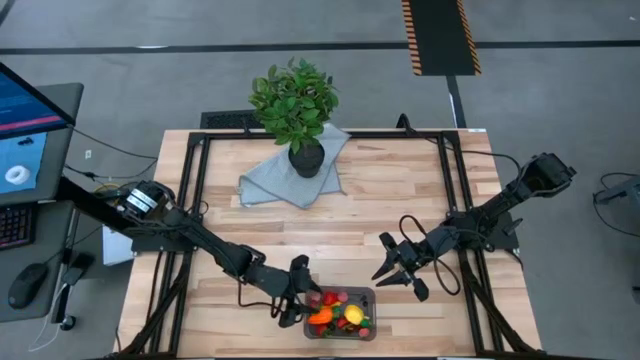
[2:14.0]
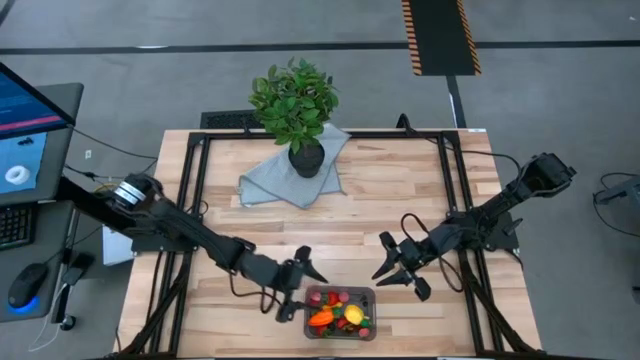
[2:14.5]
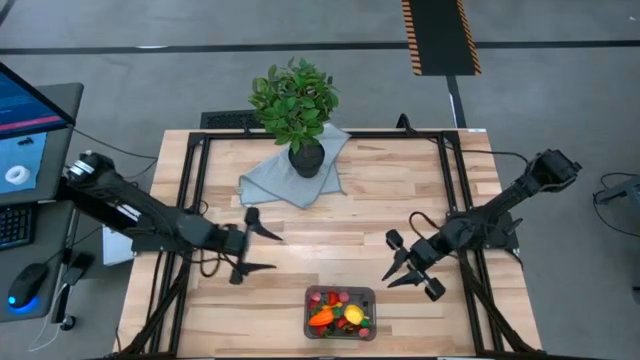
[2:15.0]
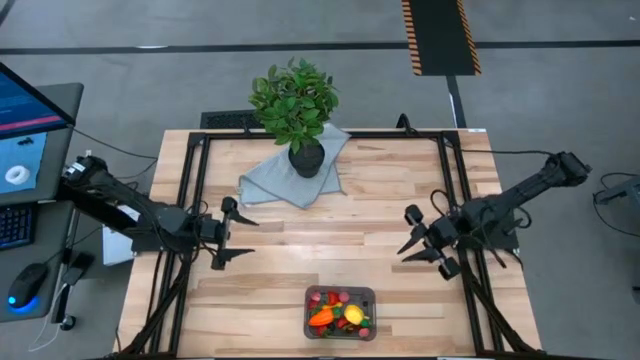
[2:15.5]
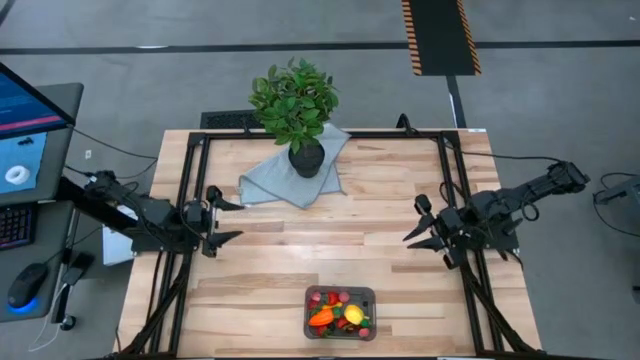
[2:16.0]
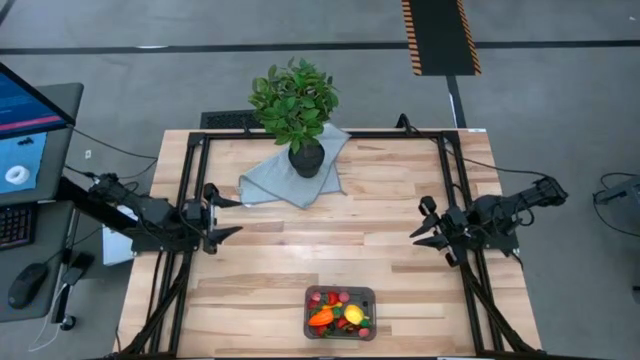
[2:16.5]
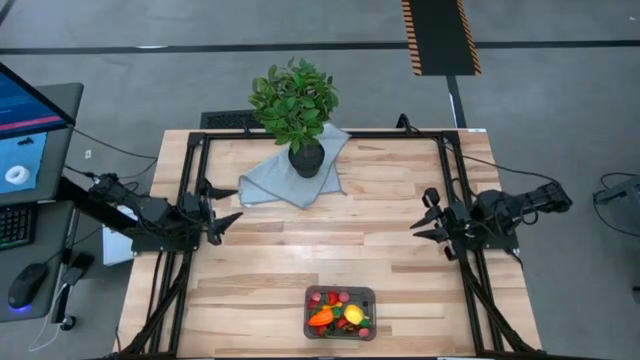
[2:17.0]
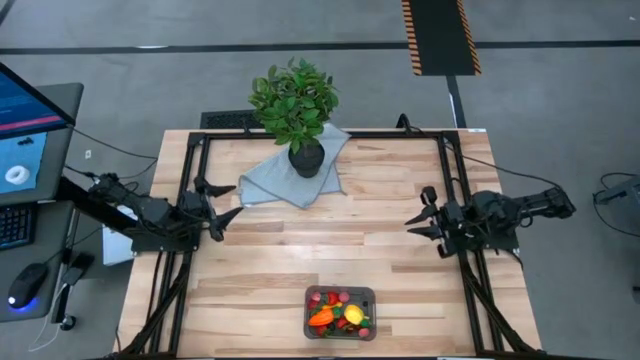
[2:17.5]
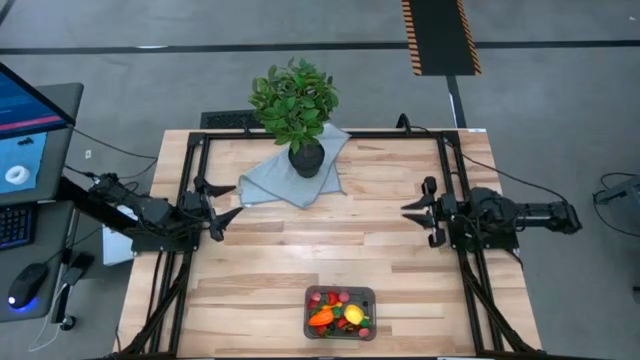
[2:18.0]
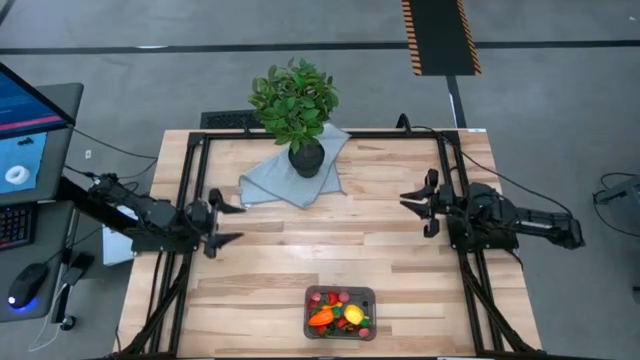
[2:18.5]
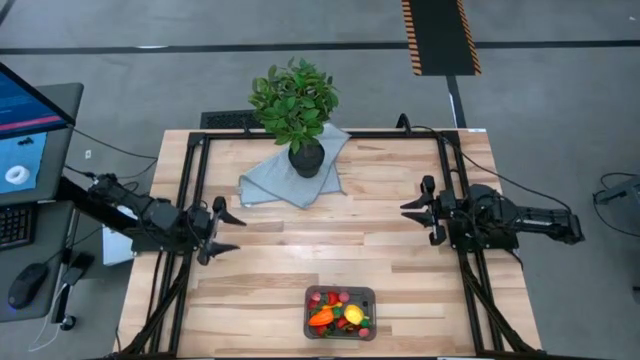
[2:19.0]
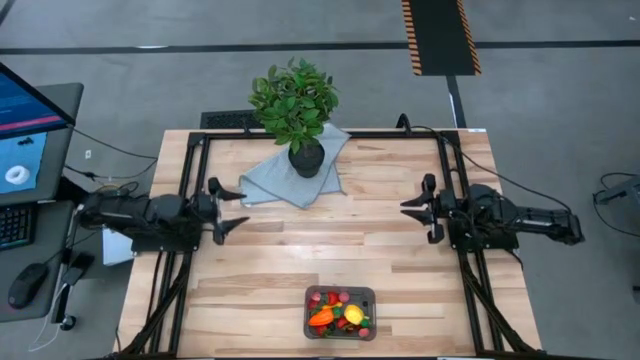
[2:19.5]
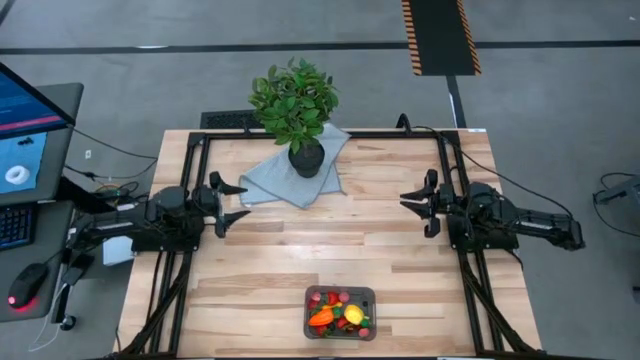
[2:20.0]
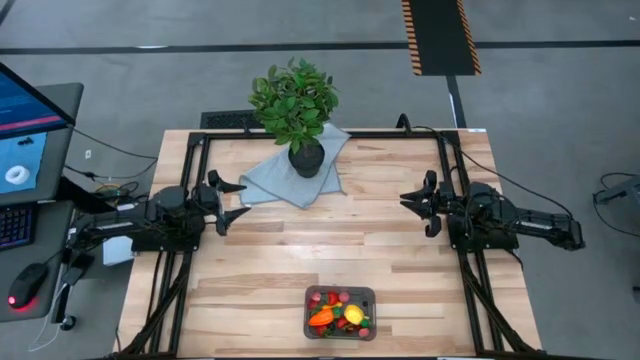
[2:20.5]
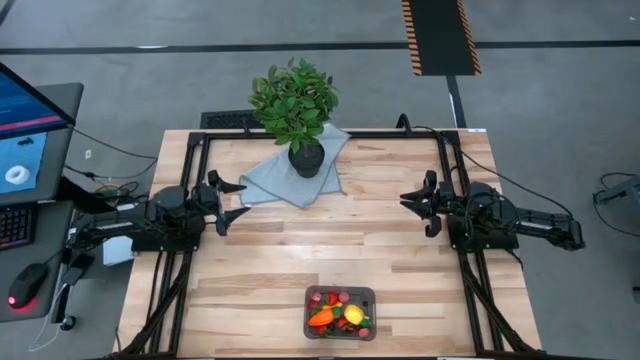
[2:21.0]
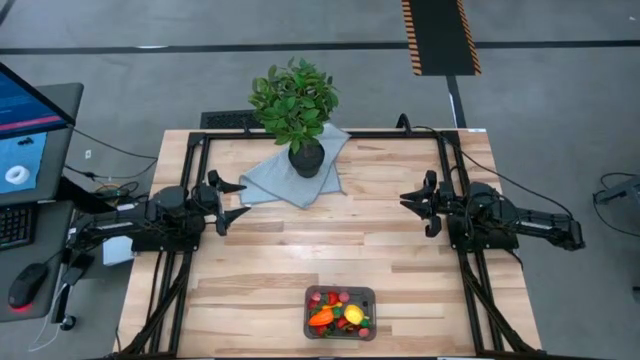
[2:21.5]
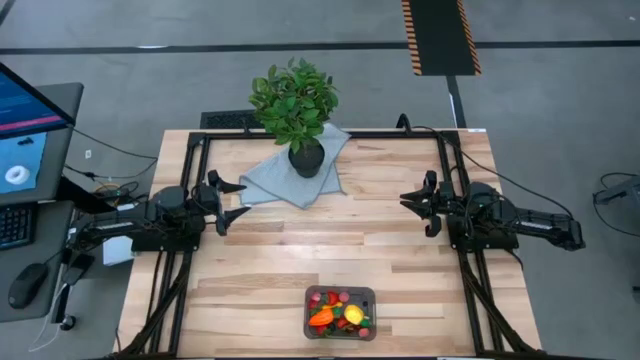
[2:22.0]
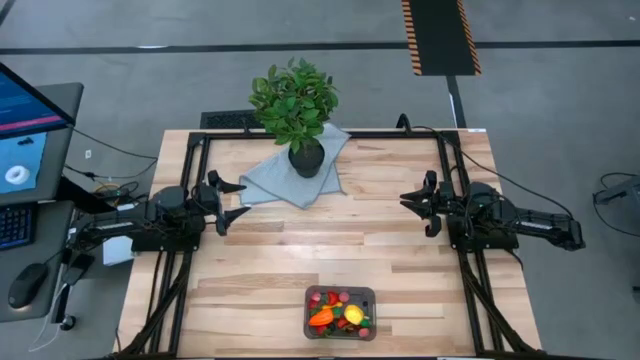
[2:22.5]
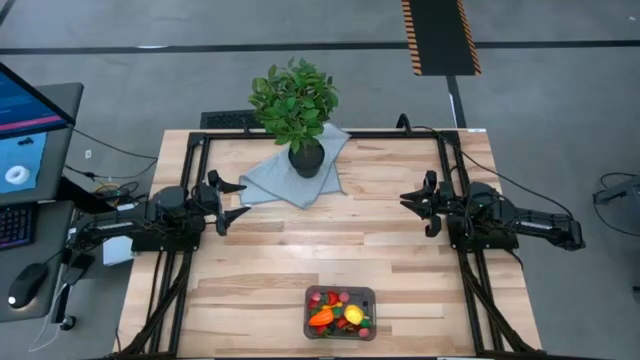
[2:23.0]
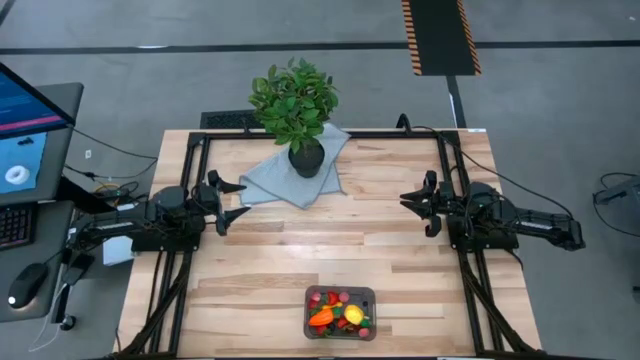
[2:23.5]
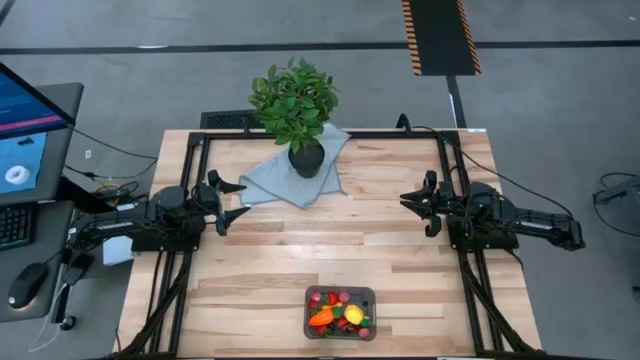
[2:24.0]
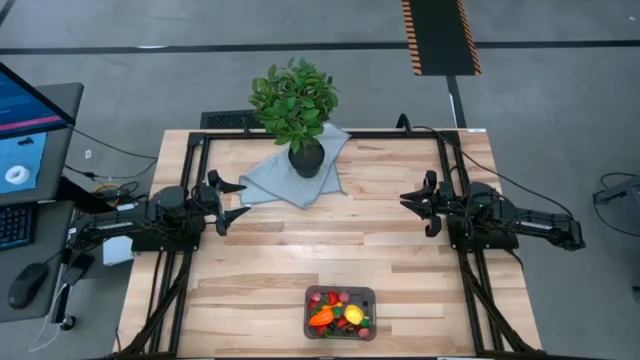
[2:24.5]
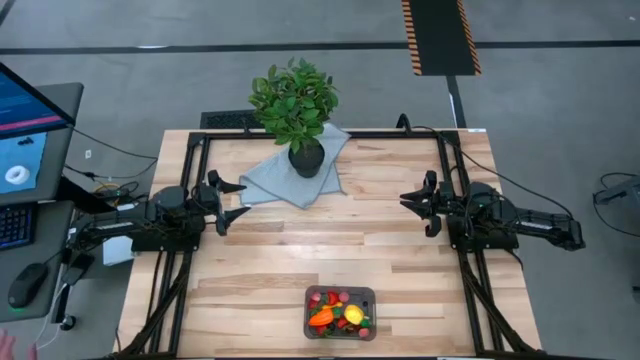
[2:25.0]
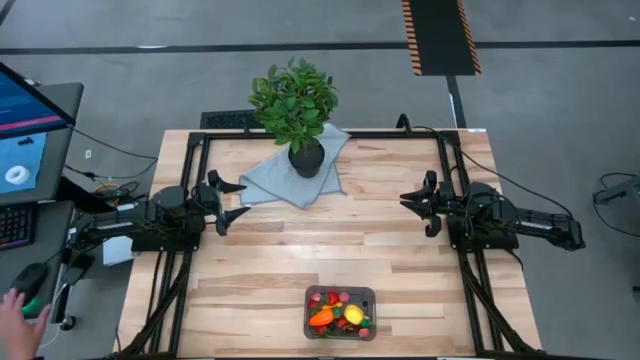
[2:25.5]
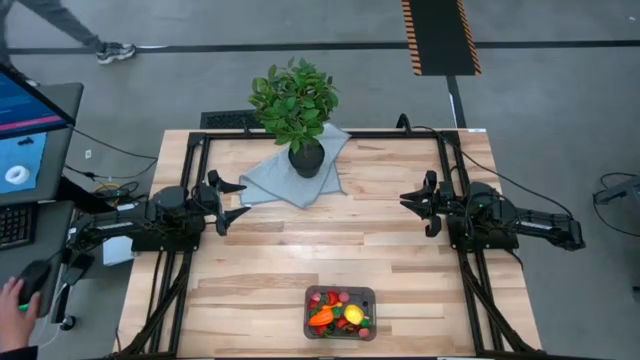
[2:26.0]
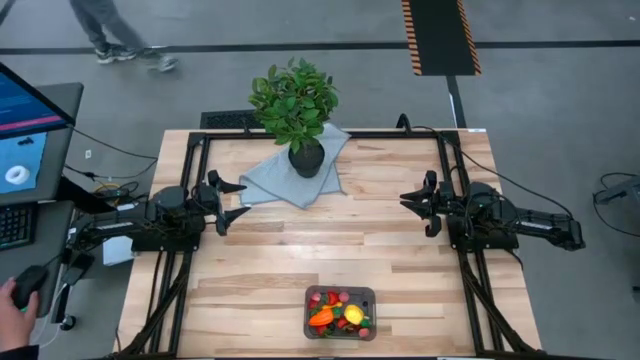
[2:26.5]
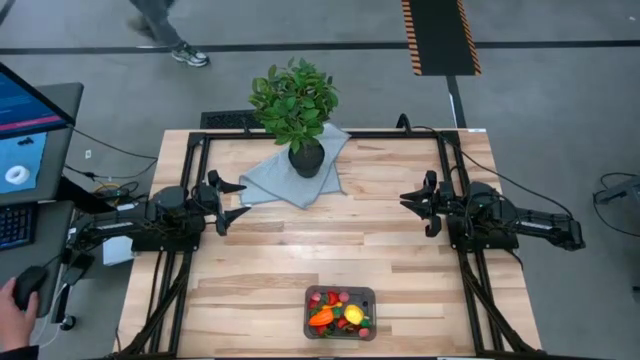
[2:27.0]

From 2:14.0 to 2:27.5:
Task: Pick and placing Produce into tupperware
Return to Home Position

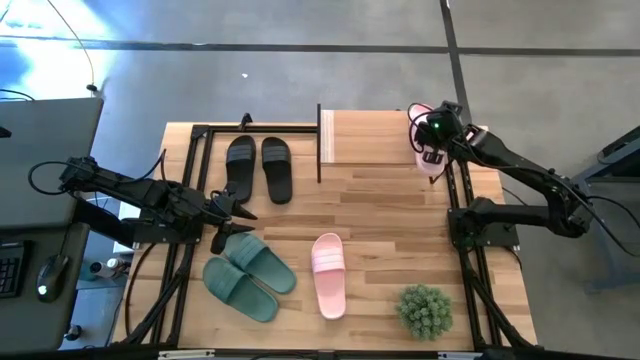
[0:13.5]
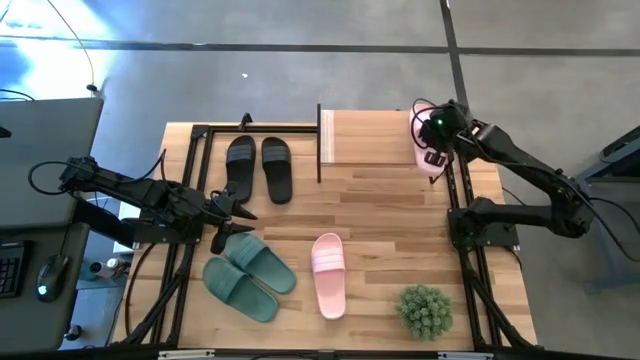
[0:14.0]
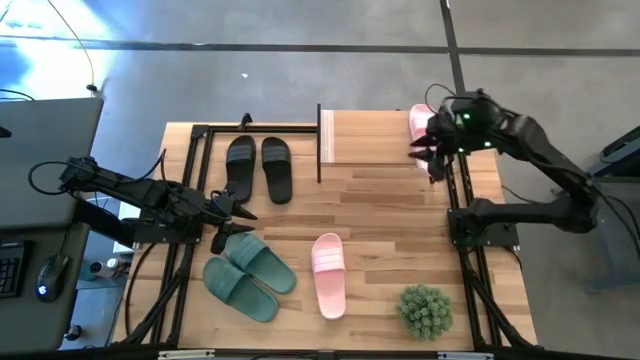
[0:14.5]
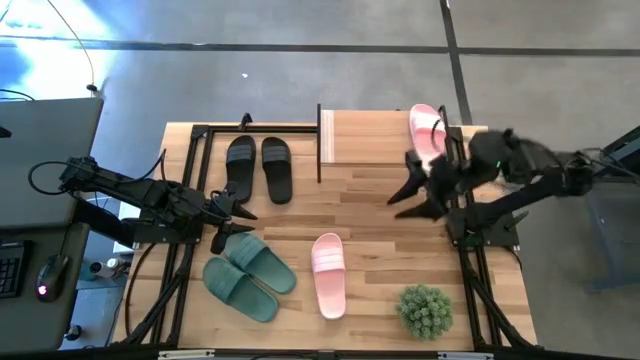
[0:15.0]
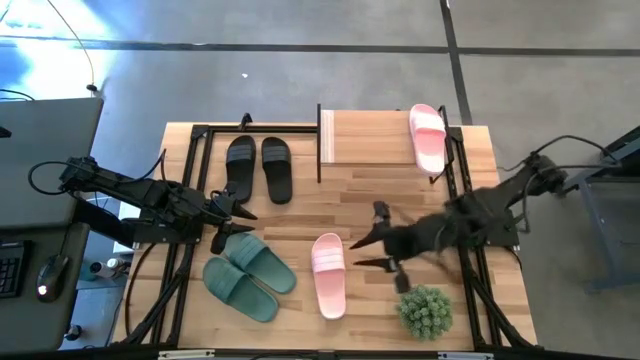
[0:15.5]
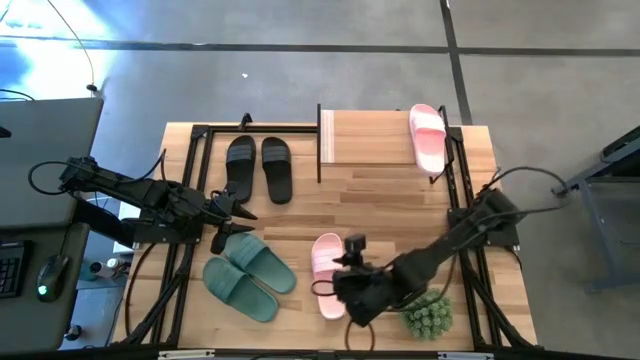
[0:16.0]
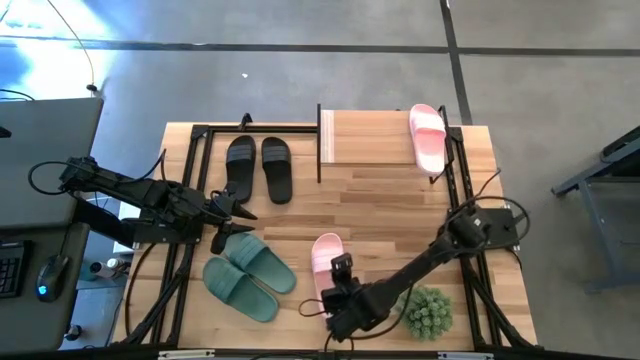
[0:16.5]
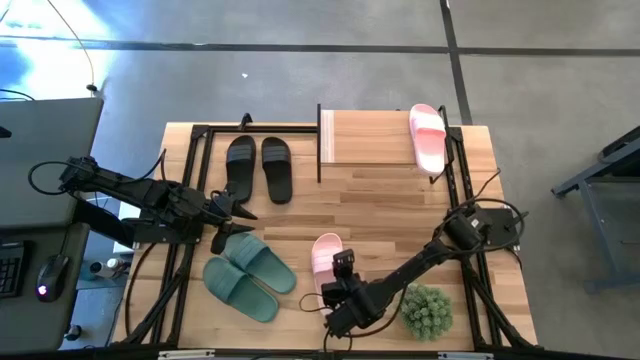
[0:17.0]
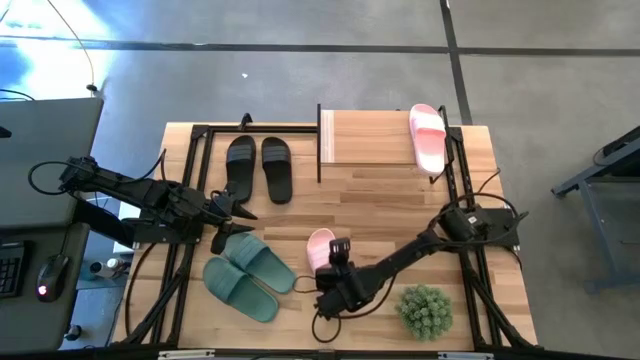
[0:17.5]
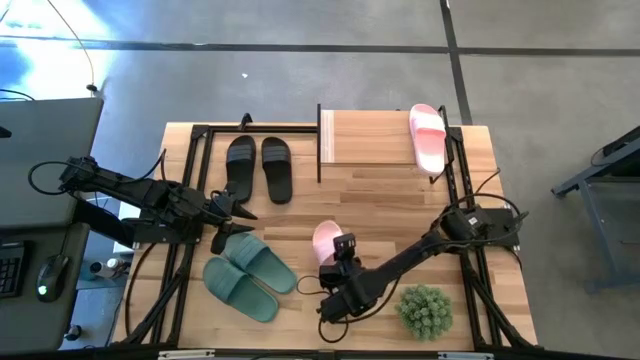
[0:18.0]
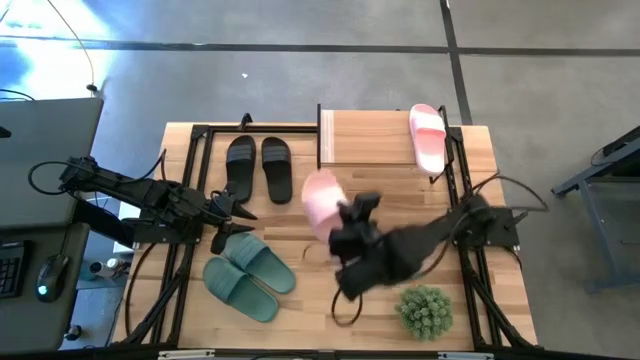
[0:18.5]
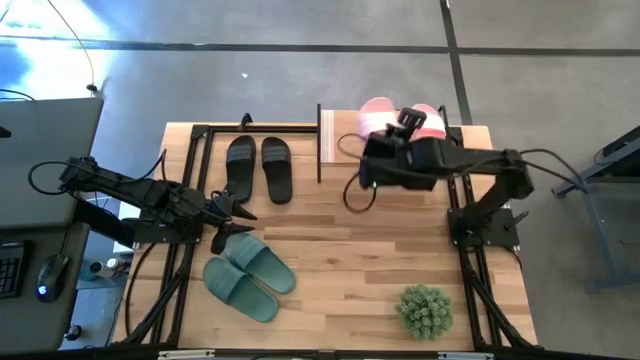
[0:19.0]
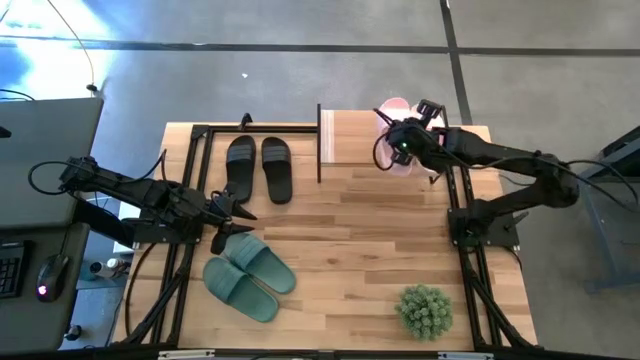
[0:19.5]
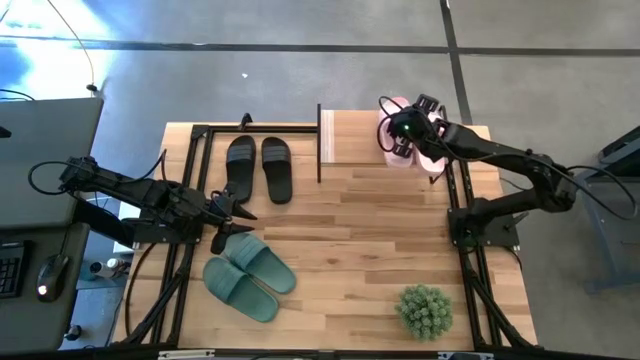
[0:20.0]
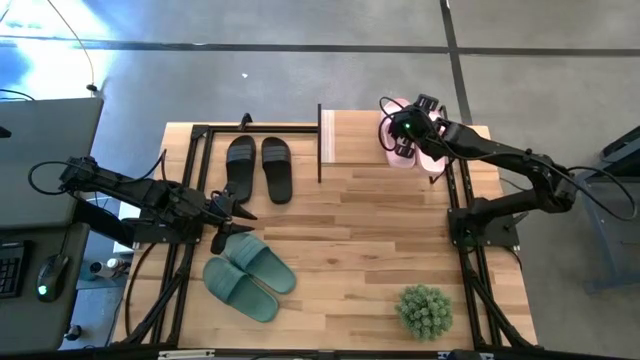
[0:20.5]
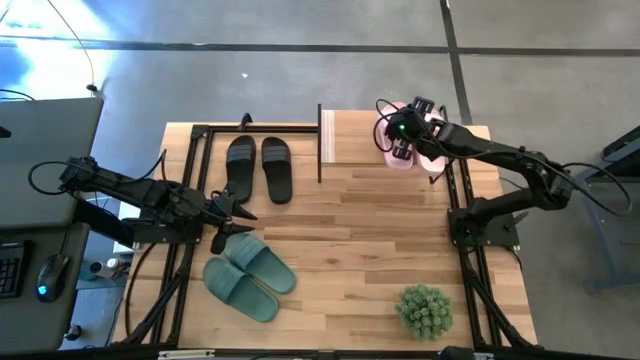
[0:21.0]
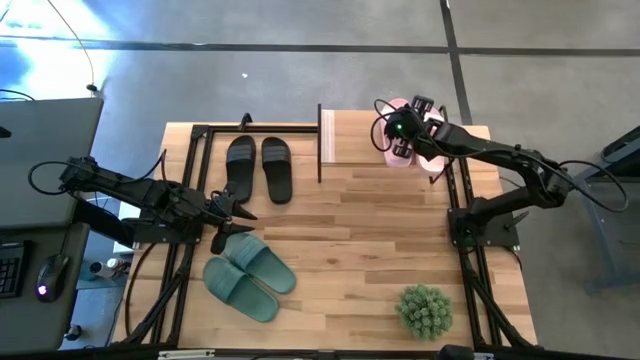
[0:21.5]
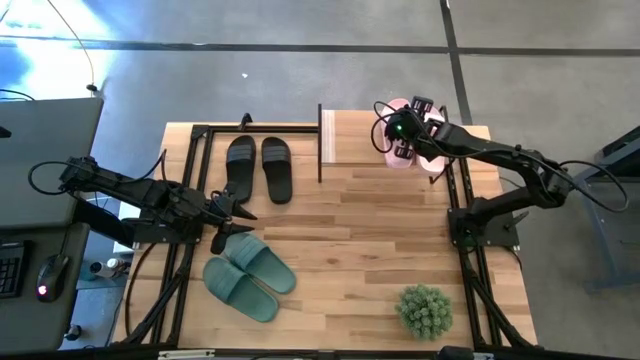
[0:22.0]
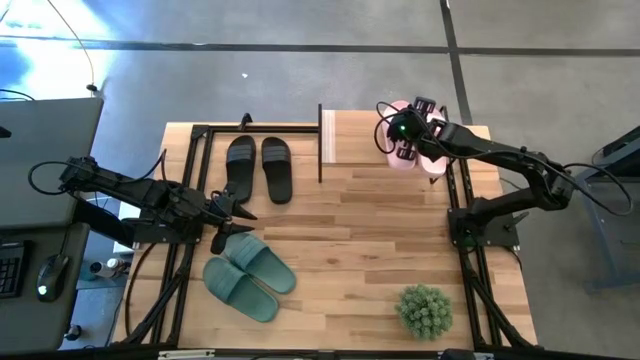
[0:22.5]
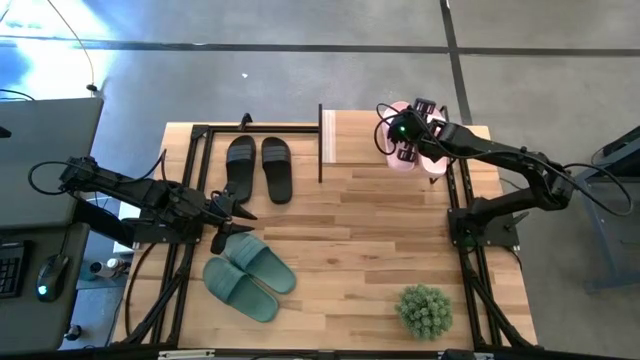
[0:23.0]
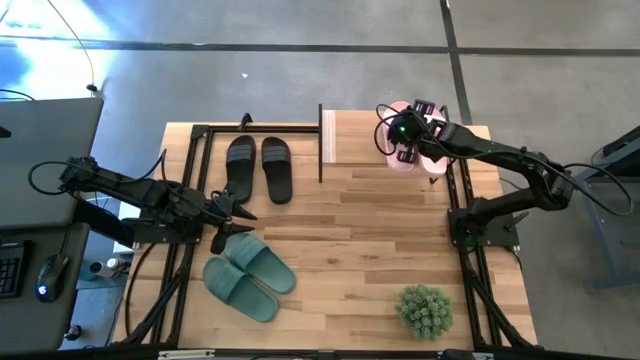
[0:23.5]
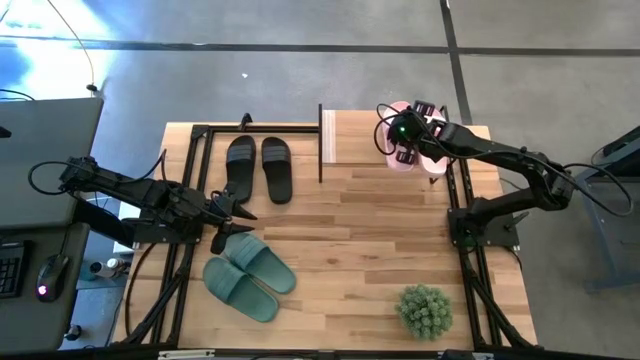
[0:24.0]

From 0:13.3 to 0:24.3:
Task: Pick and place slides into the shelf
Put the pink slipper on the shelf
